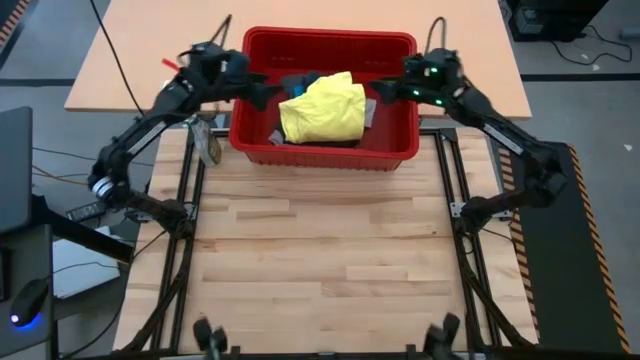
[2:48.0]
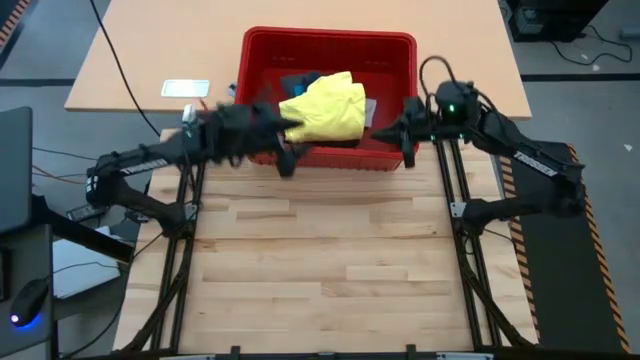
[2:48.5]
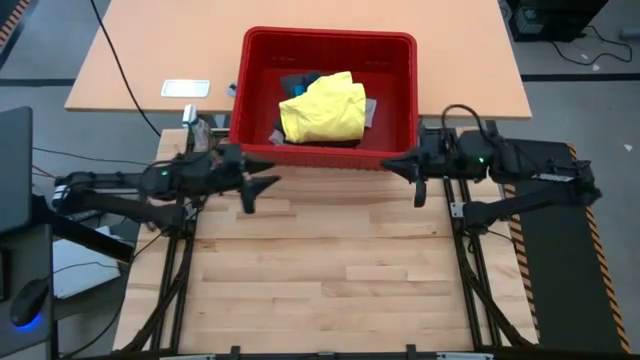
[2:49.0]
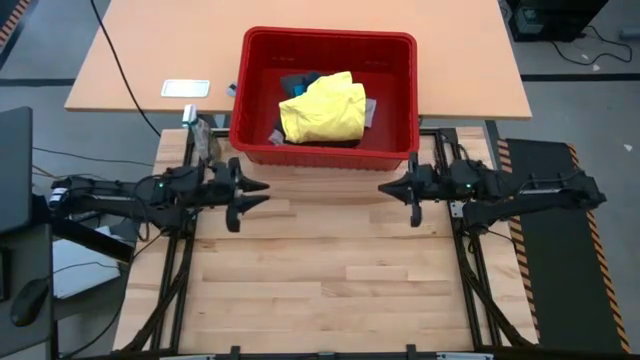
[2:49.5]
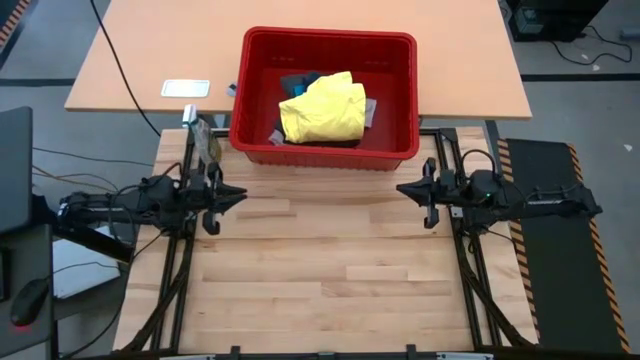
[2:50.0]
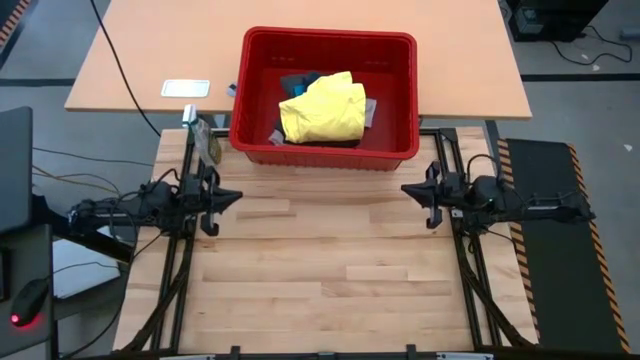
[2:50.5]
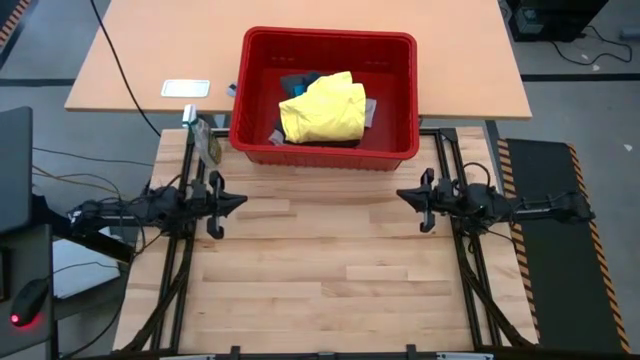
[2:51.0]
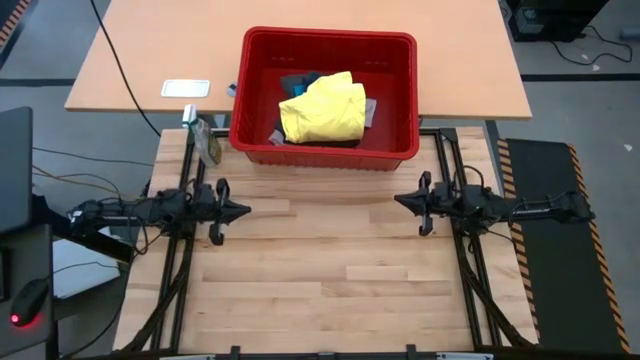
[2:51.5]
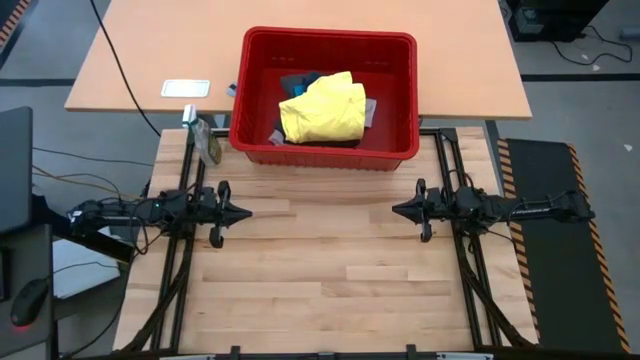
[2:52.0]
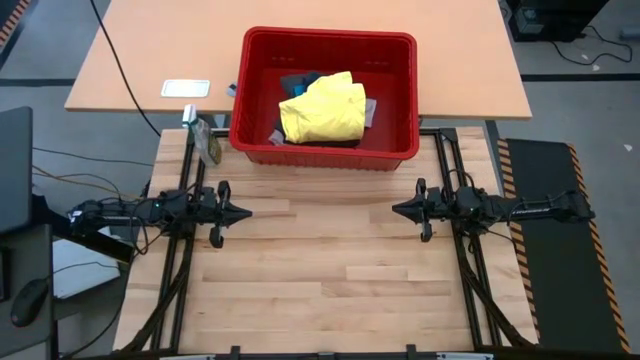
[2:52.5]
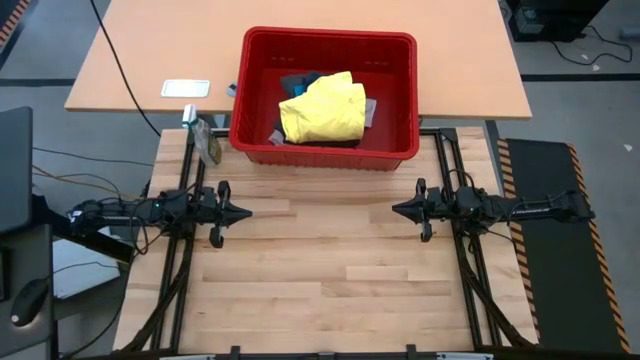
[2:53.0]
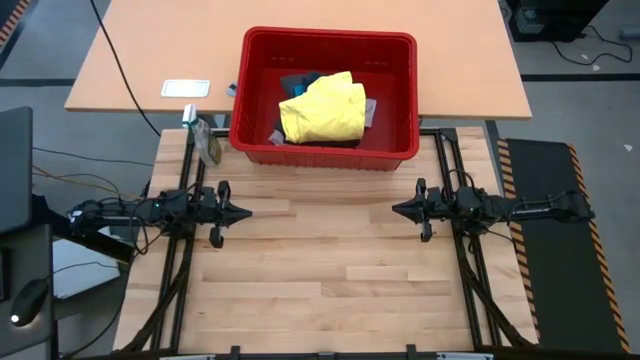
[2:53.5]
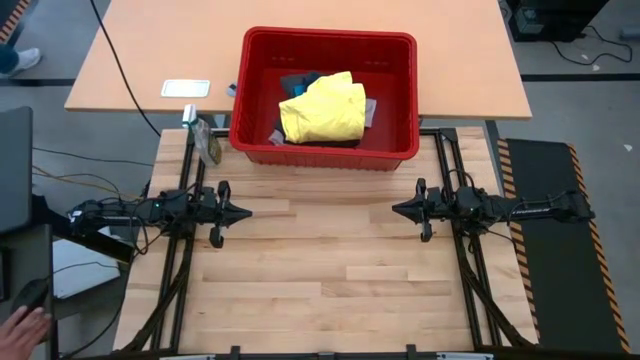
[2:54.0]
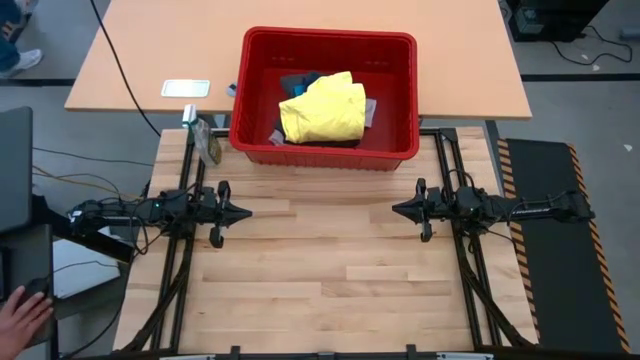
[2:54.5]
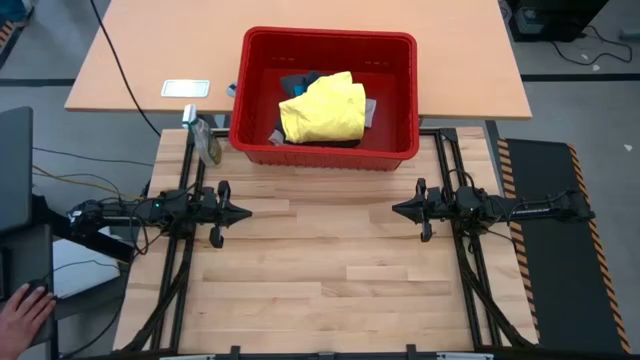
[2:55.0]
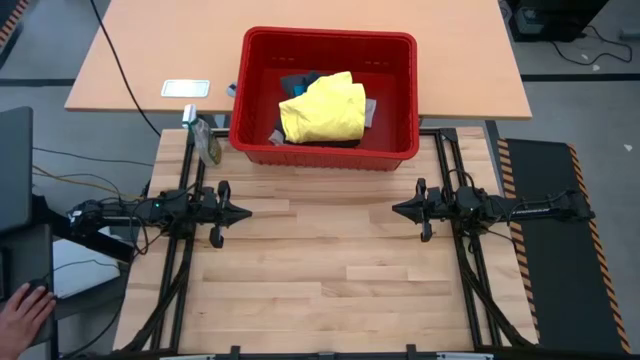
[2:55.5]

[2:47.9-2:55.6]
Task: Fold laundry
Return to Home Position

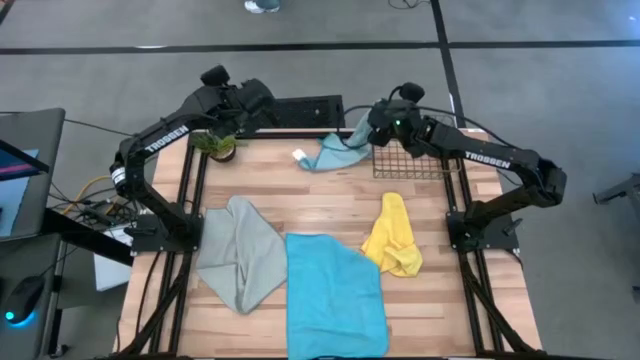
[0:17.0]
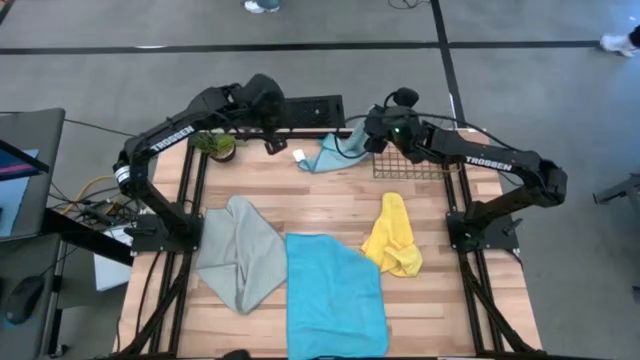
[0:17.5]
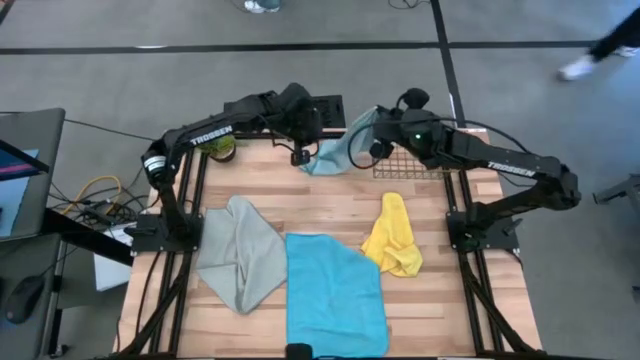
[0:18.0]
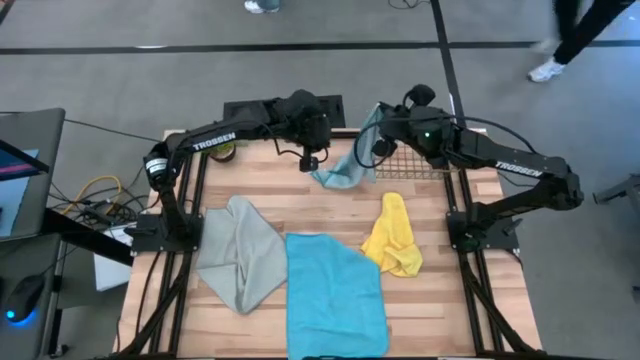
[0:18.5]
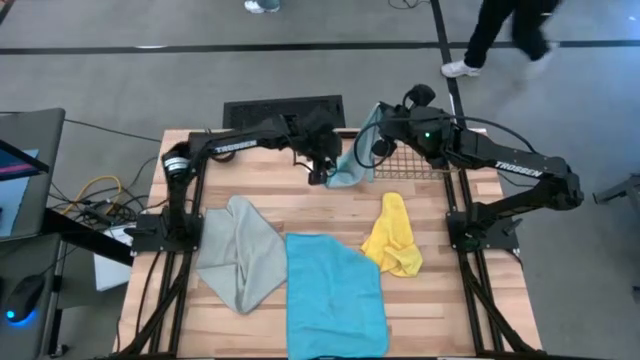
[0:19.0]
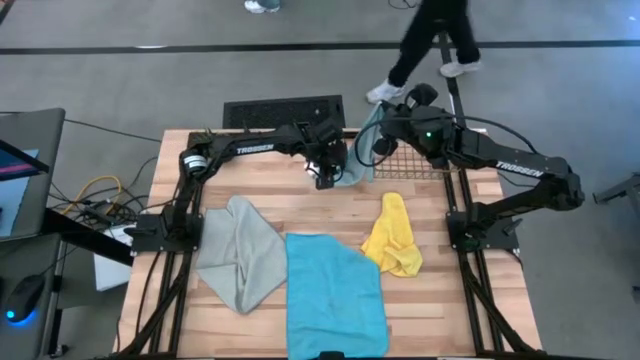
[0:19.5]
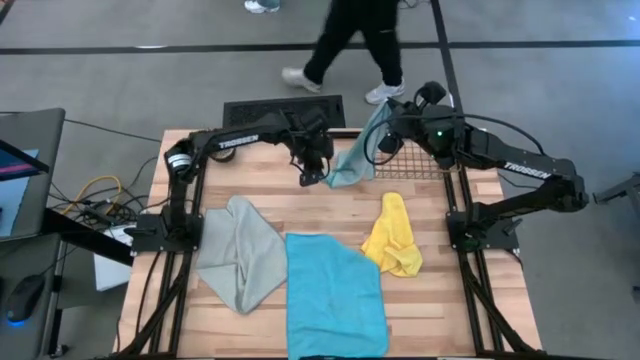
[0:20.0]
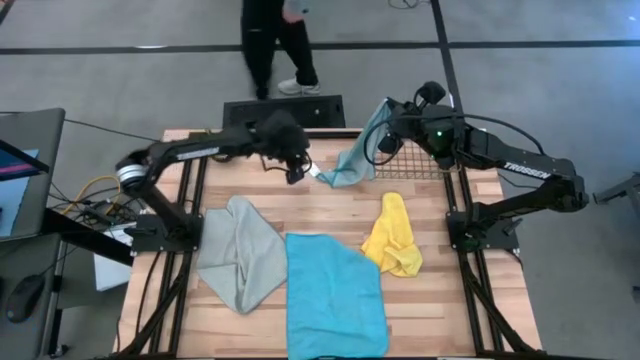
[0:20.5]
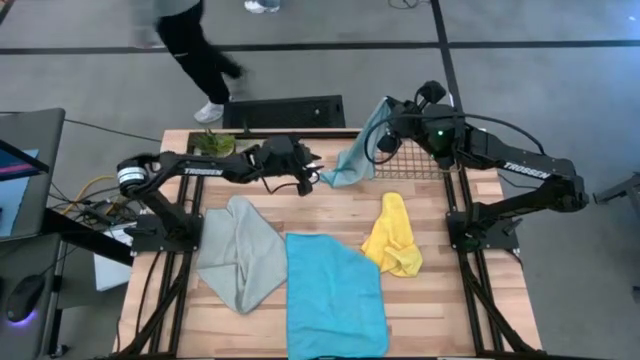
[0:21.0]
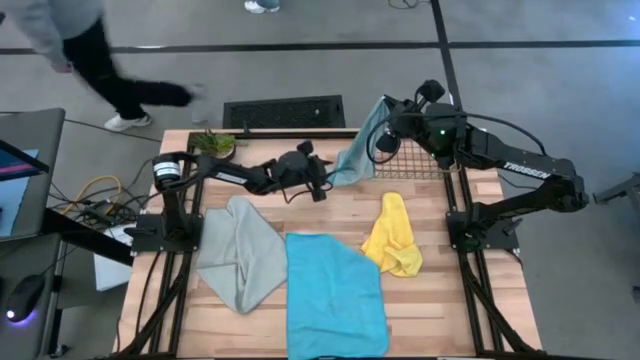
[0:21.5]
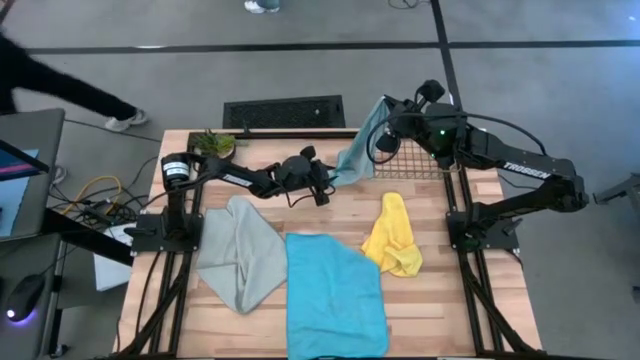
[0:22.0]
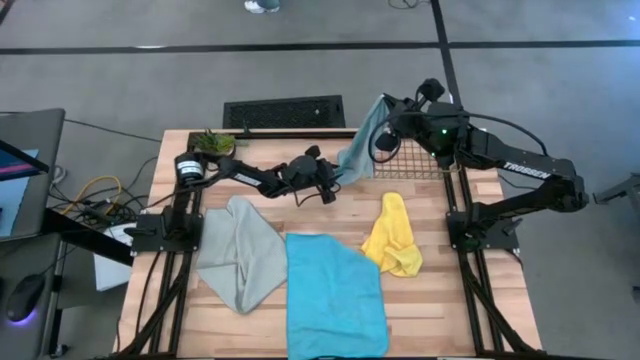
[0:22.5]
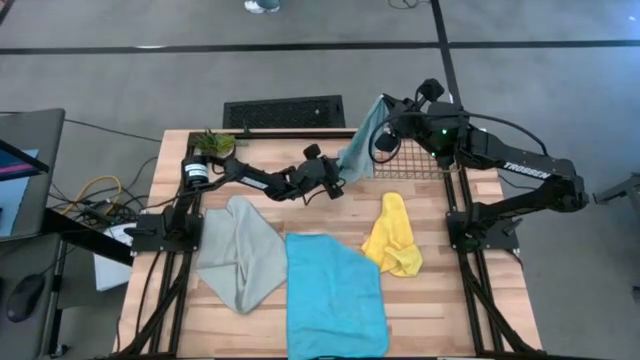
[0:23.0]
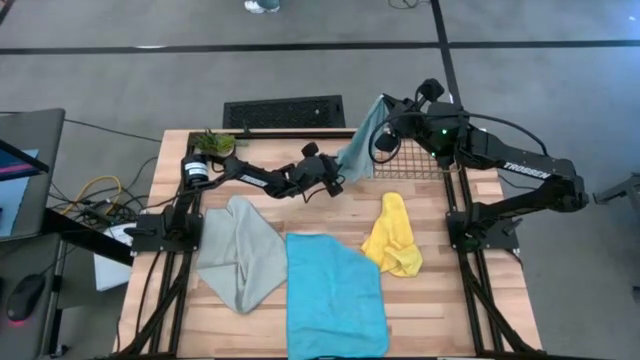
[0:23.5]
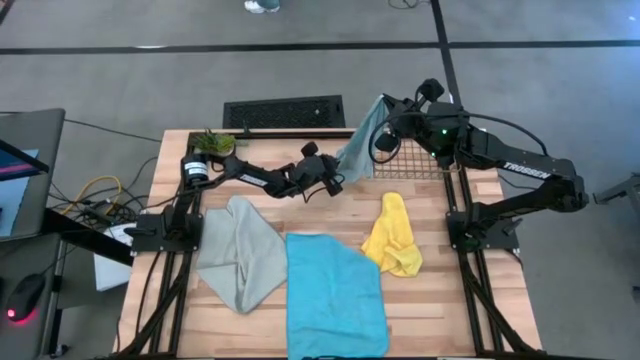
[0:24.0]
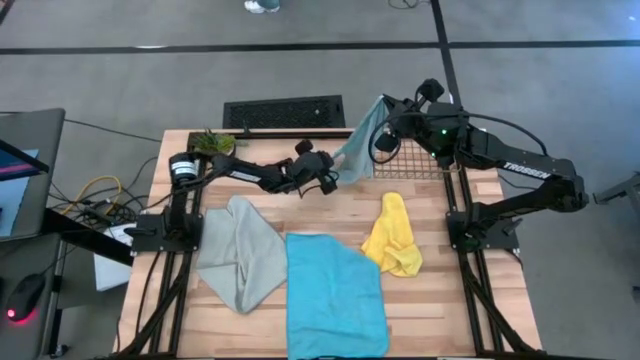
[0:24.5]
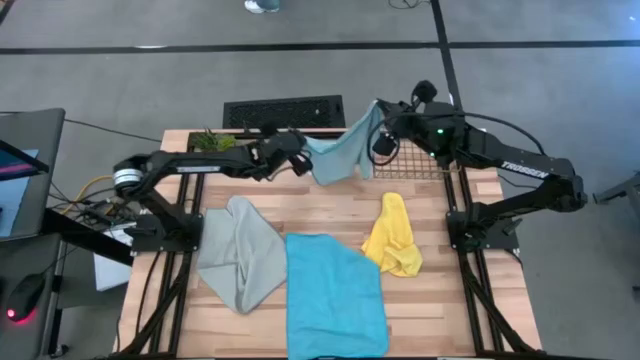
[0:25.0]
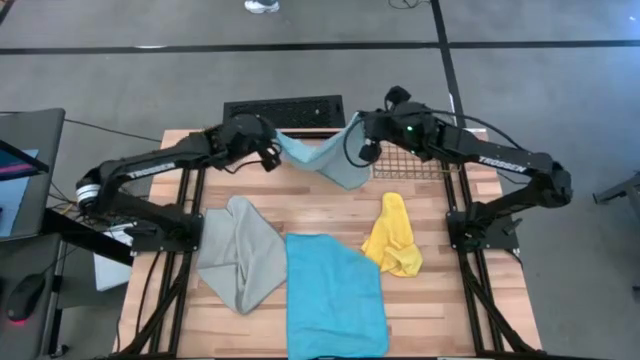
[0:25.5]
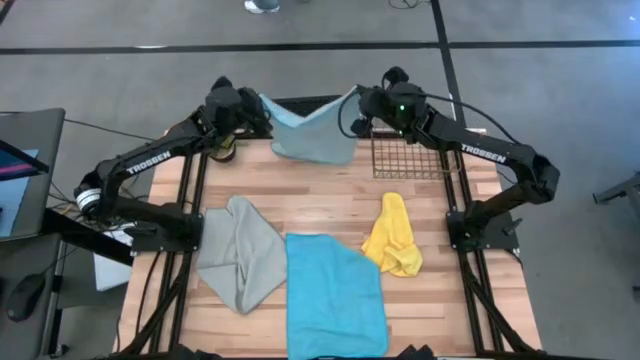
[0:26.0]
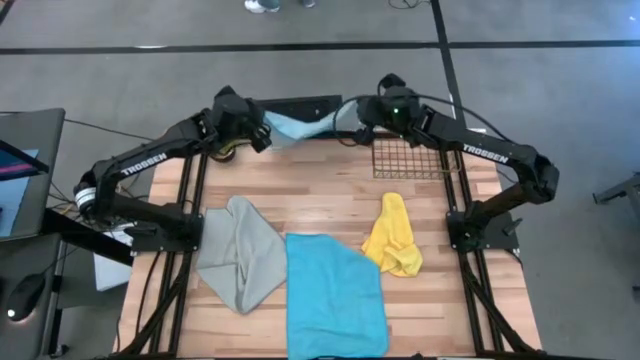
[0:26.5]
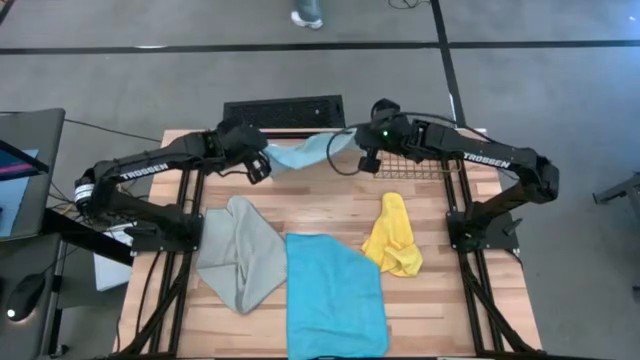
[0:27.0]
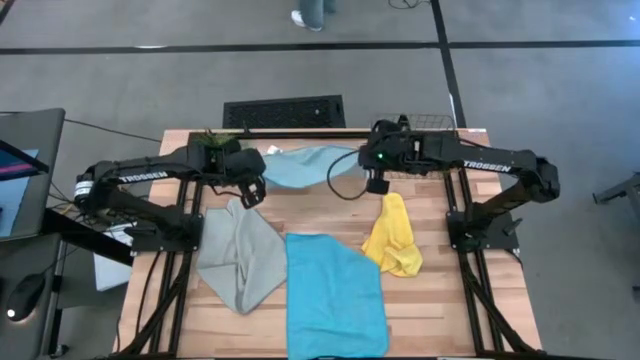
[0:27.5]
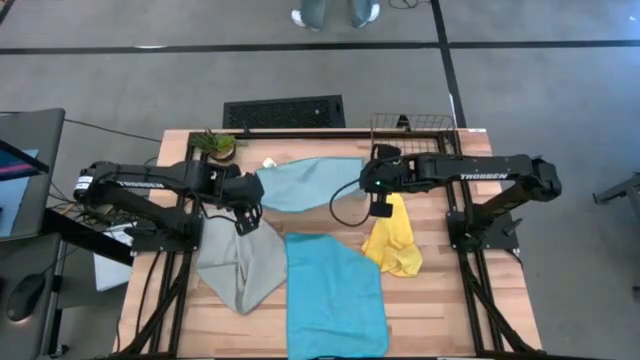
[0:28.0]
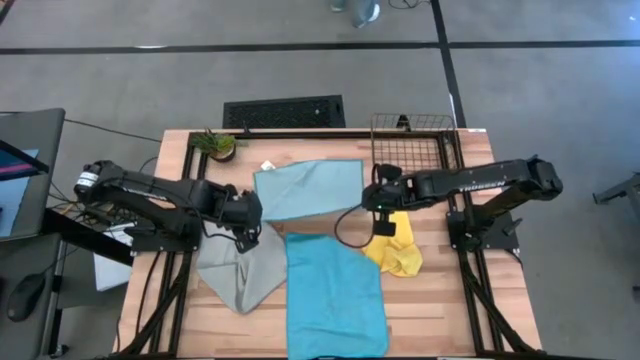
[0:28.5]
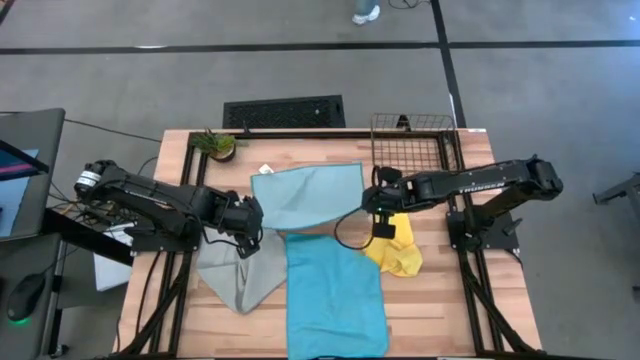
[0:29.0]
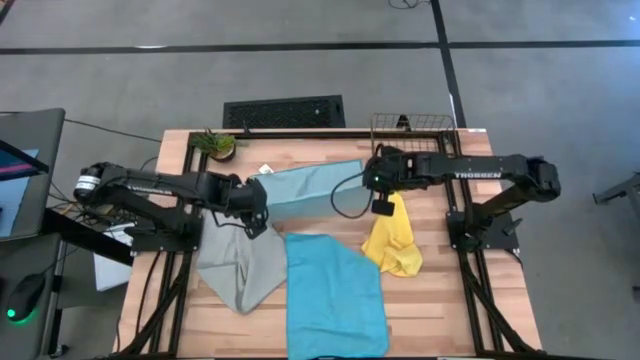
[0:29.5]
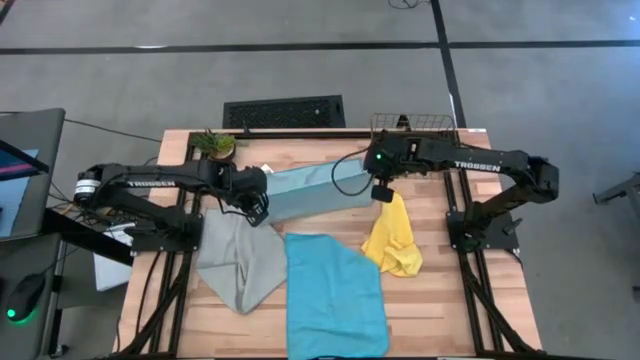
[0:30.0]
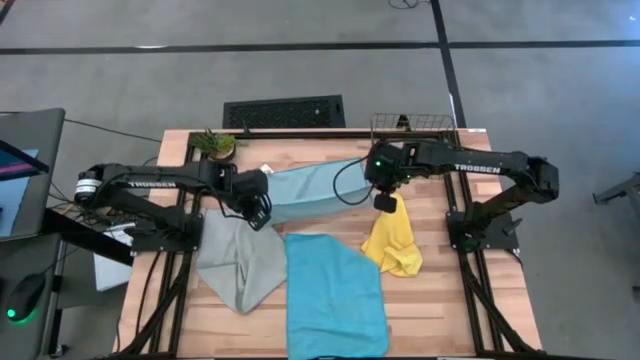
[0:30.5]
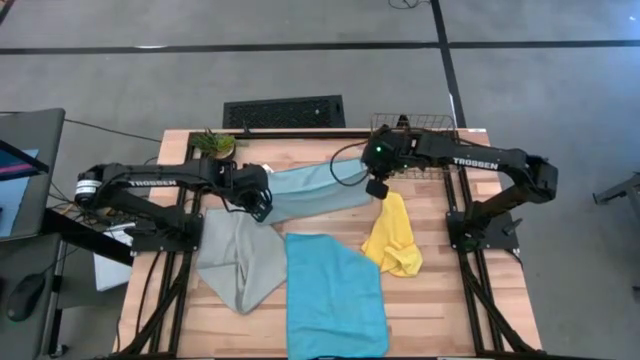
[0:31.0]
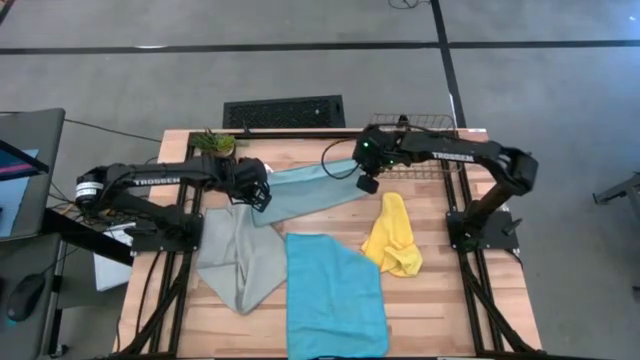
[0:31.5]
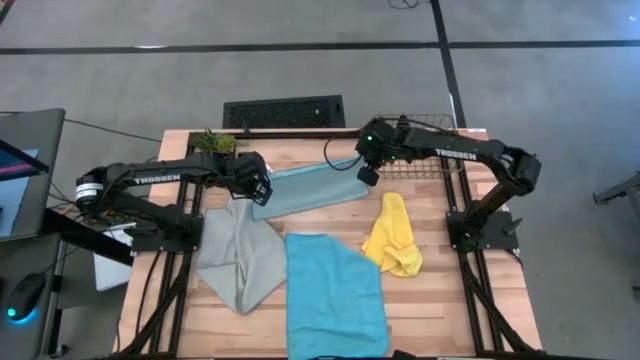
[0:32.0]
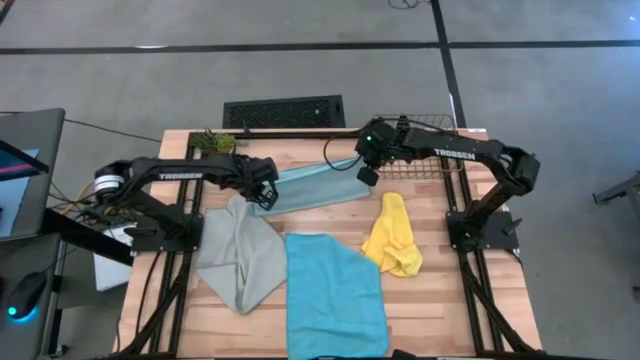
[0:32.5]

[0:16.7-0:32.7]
Task: Fold microfiber towels
Fold the light blue microfiber cloth
